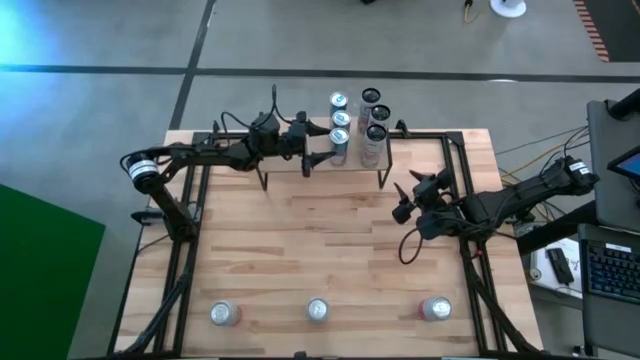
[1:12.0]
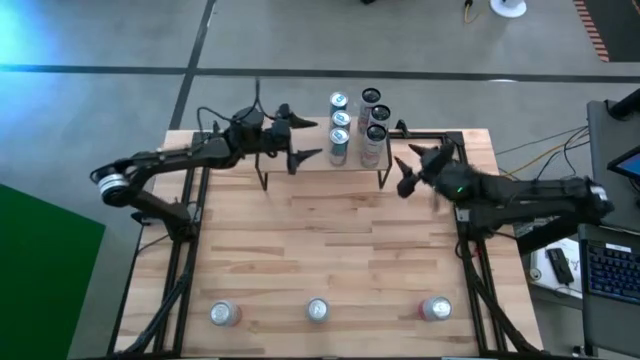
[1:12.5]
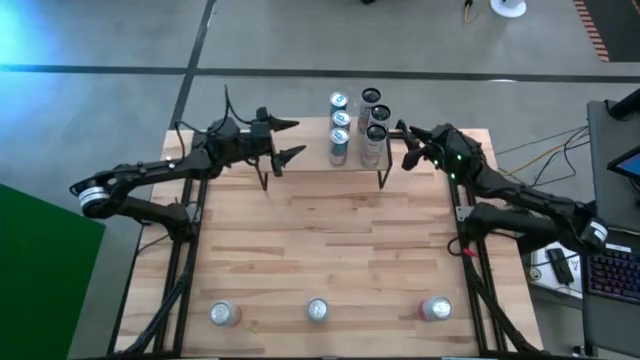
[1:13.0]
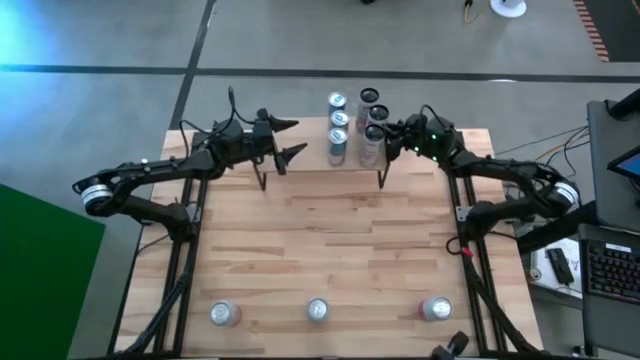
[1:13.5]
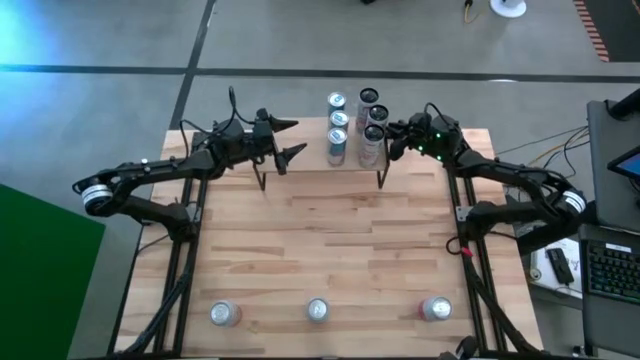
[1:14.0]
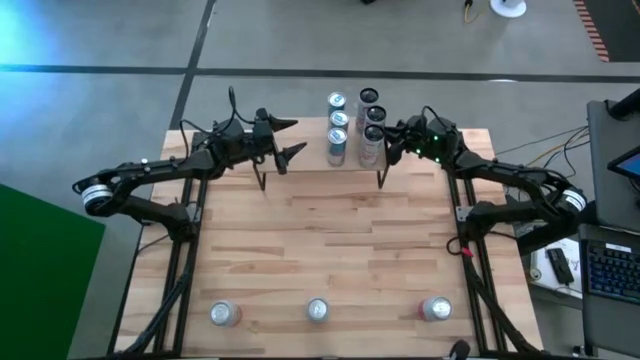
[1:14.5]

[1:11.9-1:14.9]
Task: Place canned beverage on shelf
Adjust the white soda can

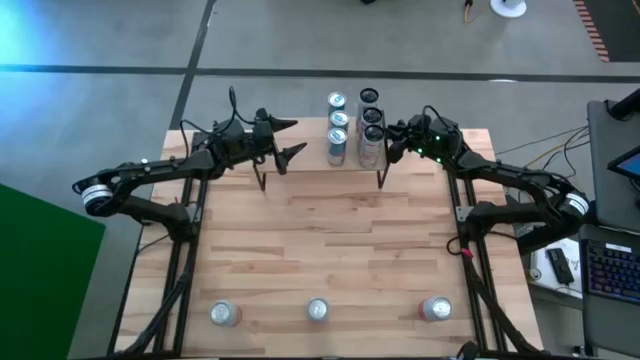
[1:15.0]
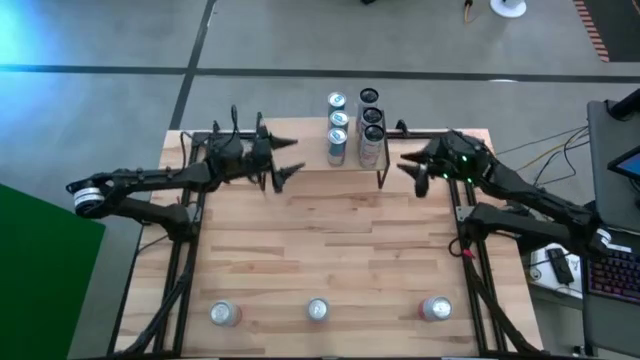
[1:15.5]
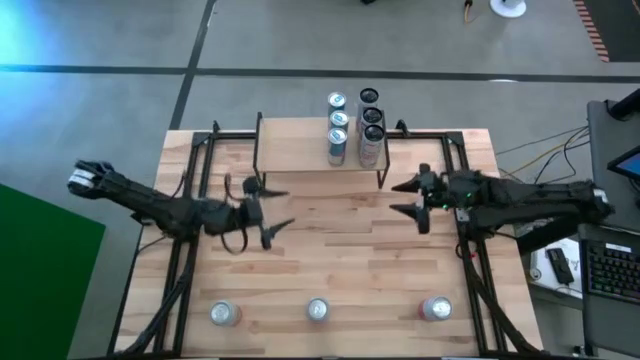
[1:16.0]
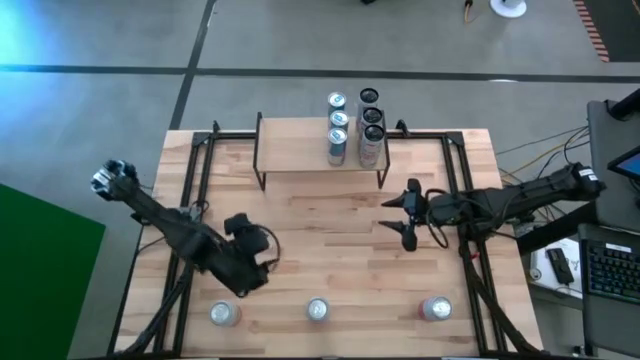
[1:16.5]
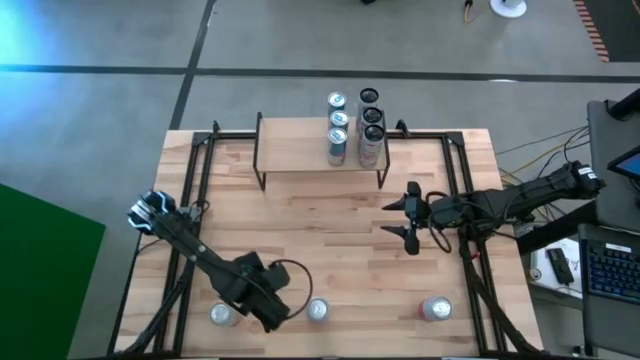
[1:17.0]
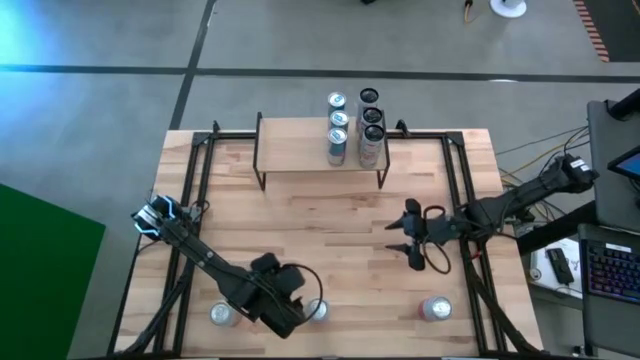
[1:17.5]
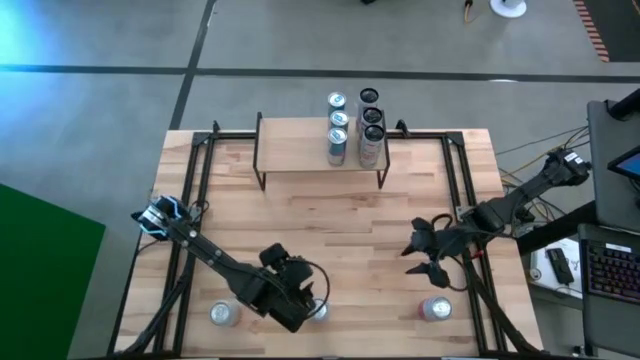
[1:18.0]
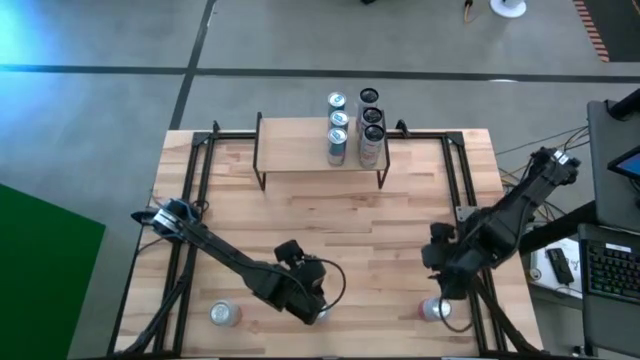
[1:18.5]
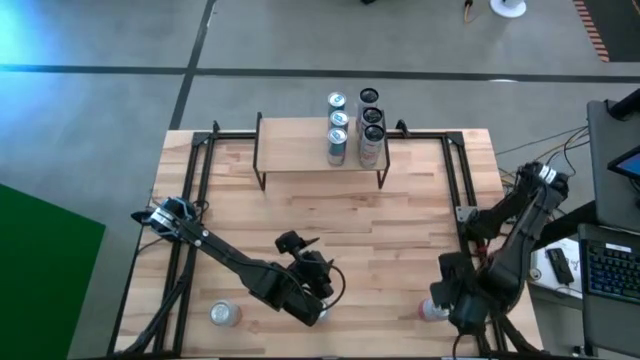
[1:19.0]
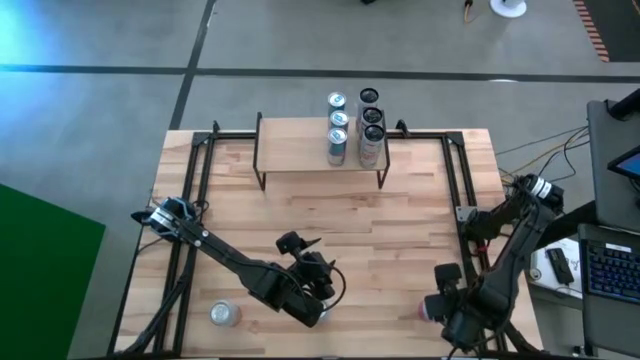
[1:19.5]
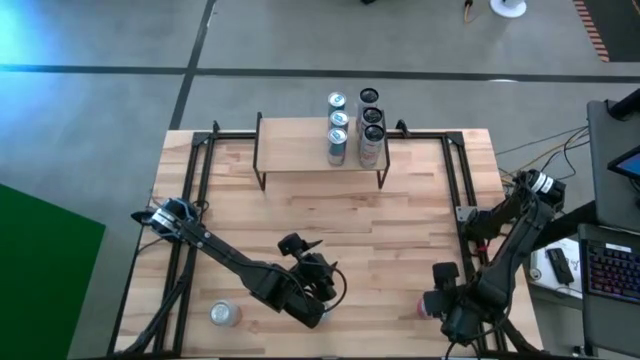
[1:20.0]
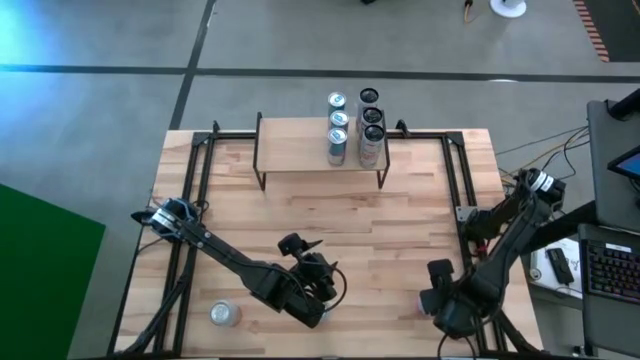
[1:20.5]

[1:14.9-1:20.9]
Put the right pink soda can on the shelf

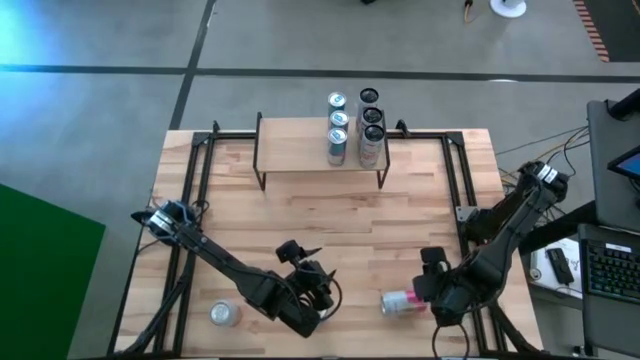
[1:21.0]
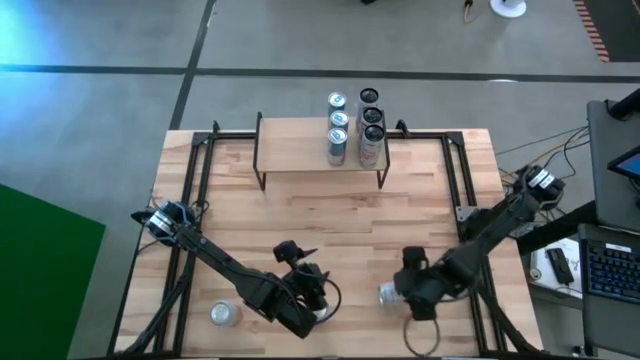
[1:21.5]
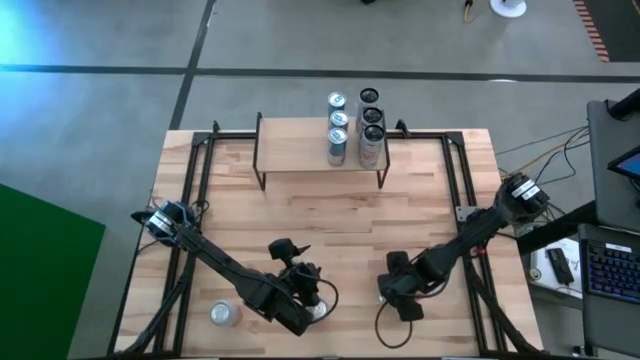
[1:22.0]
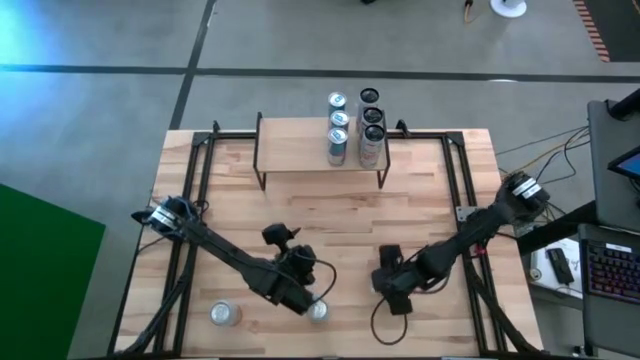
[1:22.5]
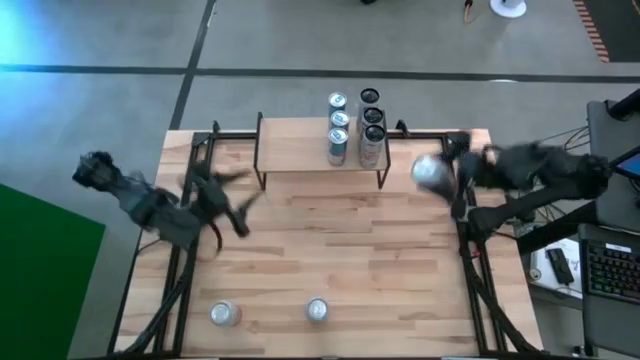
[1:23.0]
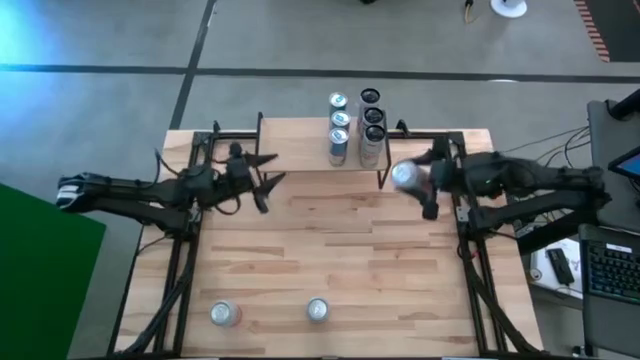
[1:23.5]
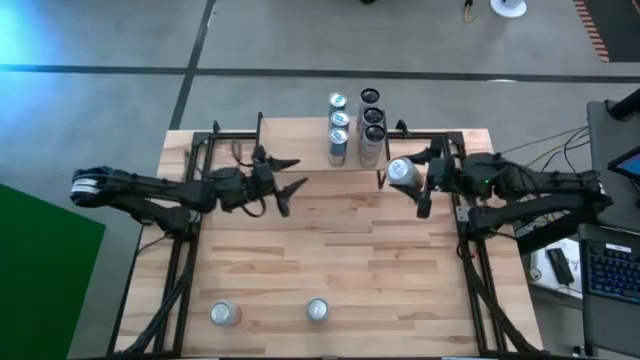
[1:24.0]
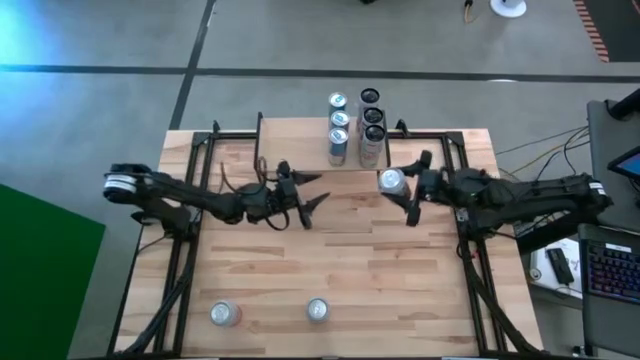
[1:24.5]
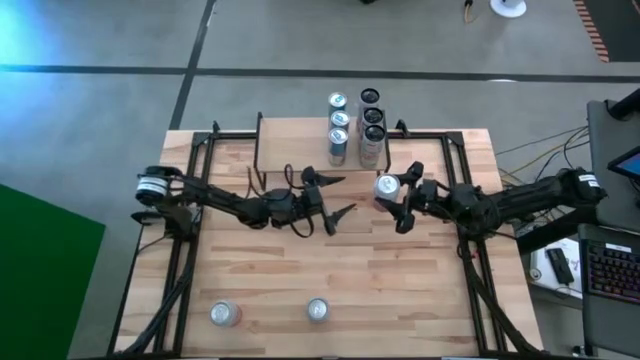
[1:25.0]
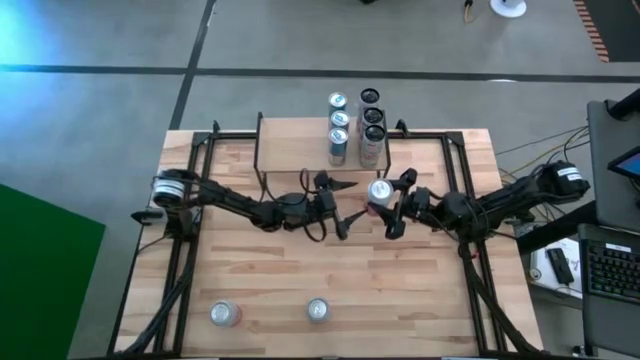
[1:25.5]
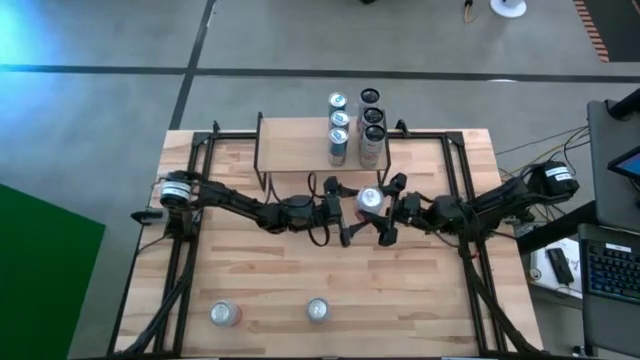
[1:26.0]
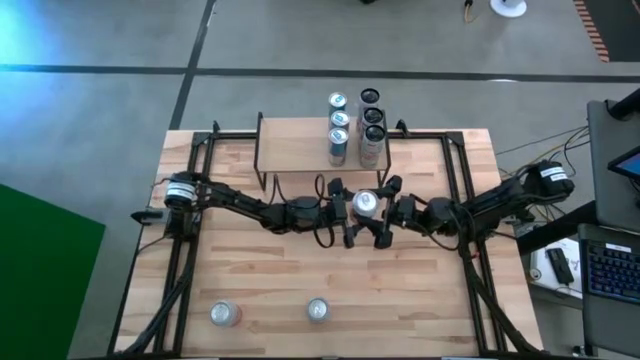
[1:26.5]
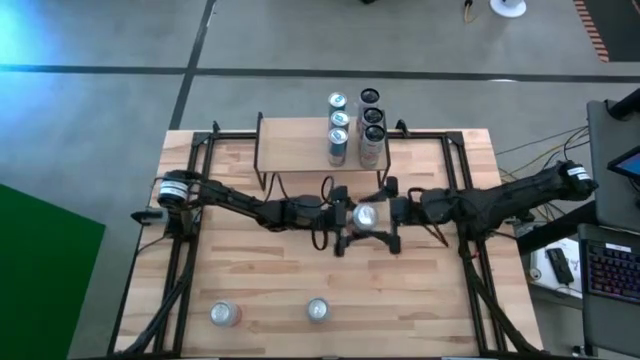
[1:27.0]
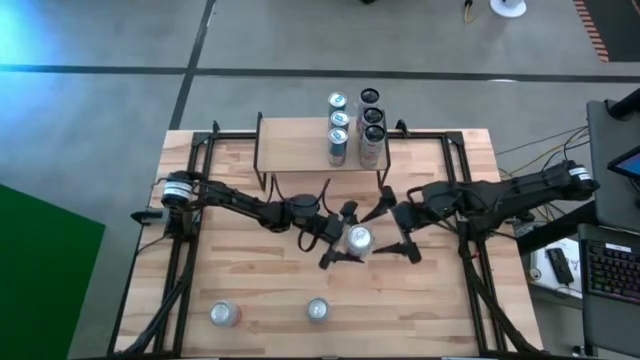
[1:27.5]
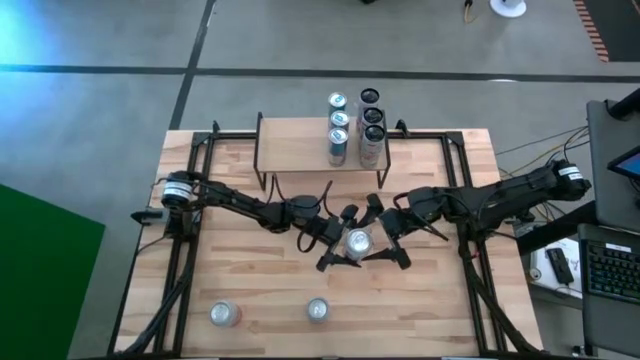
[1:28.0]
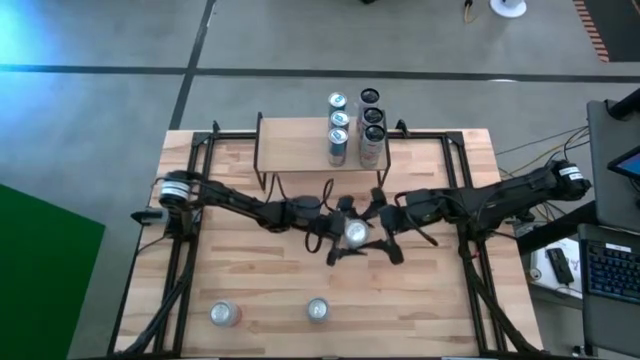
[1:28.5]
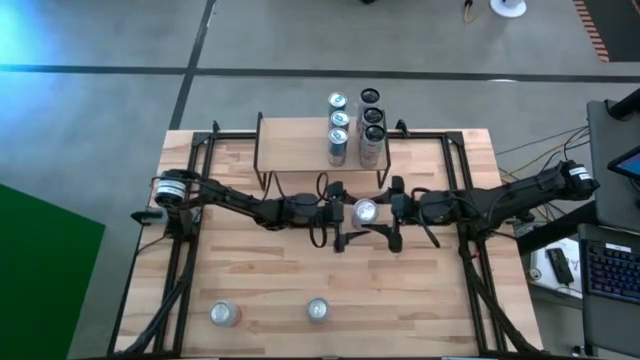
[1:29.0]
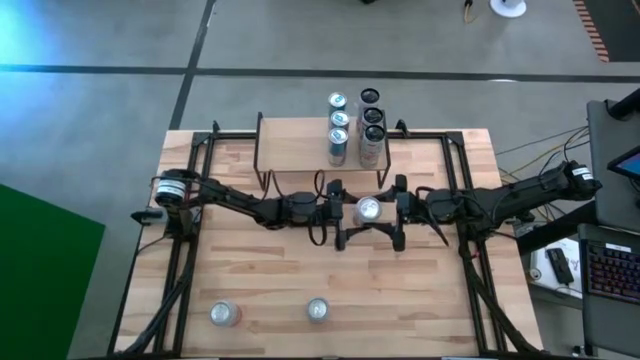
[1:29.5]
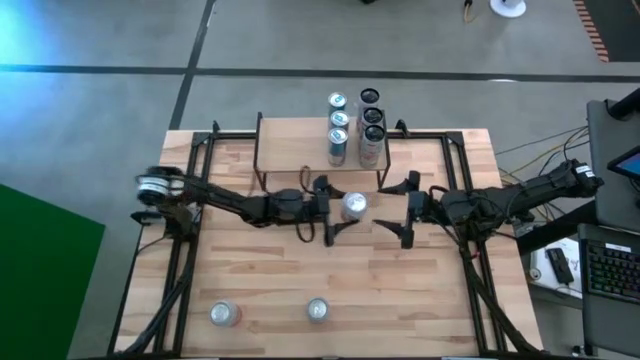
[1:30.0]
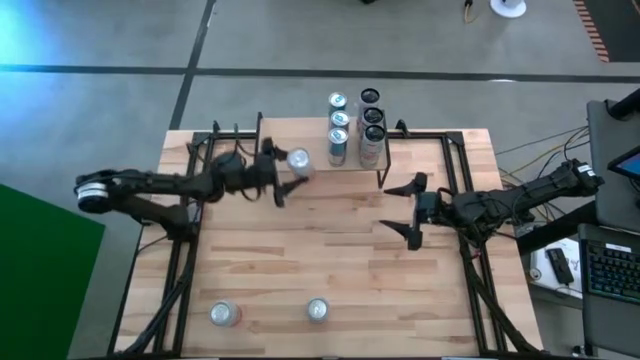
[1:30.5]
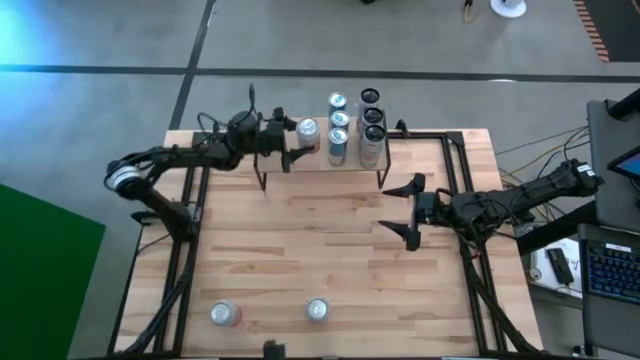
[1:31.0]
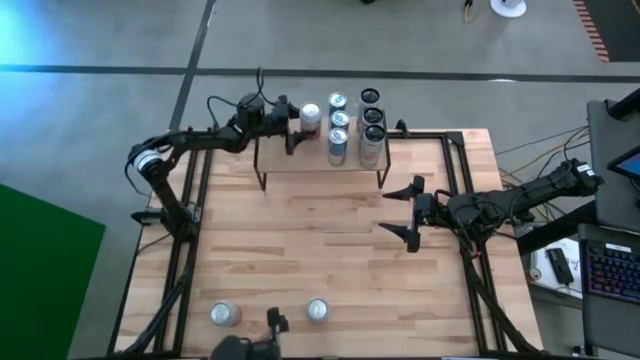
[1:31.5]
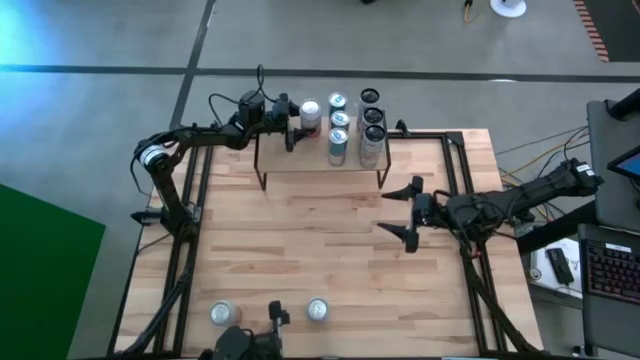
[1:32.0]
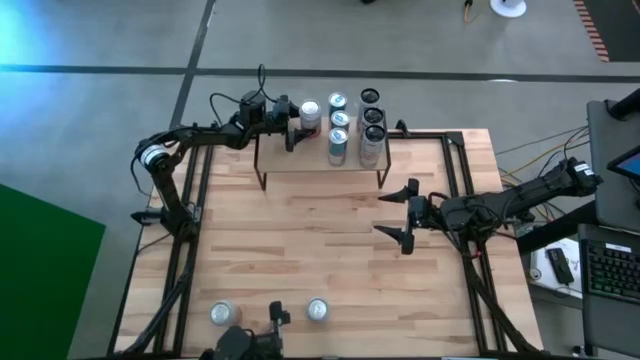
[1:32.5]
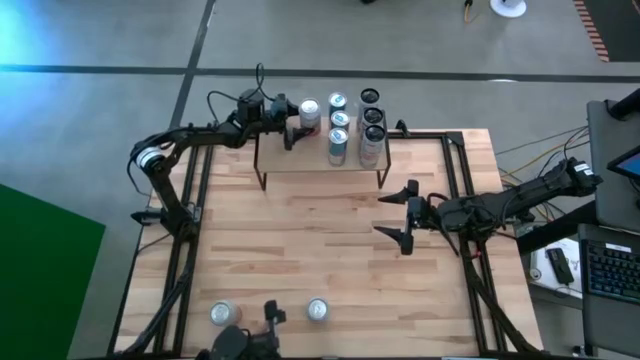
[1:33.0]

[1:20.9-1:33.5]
Put the right pink soda can on the shelf
